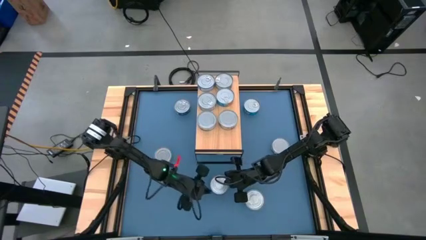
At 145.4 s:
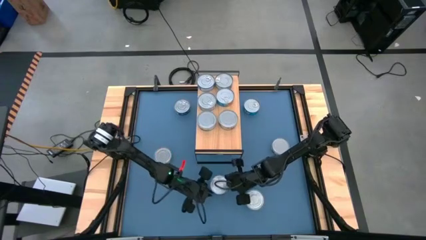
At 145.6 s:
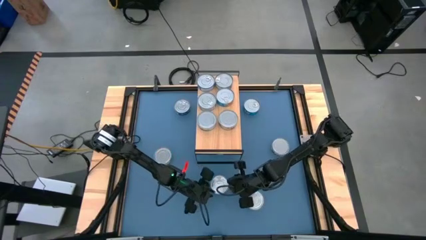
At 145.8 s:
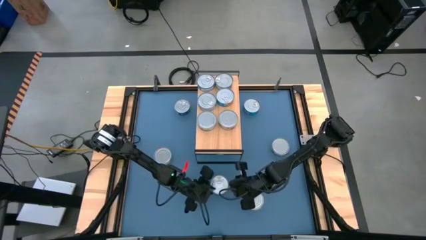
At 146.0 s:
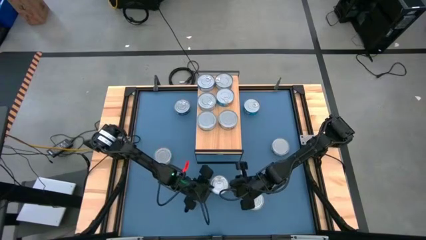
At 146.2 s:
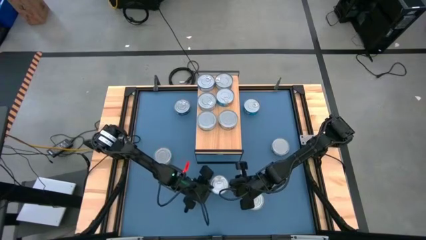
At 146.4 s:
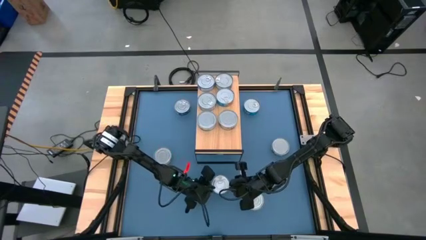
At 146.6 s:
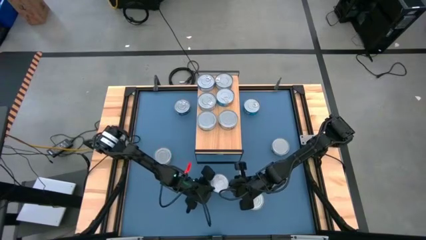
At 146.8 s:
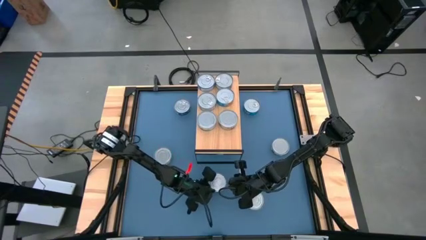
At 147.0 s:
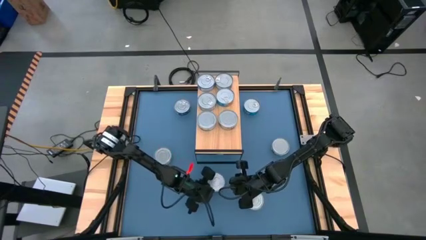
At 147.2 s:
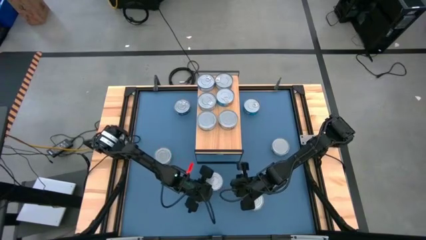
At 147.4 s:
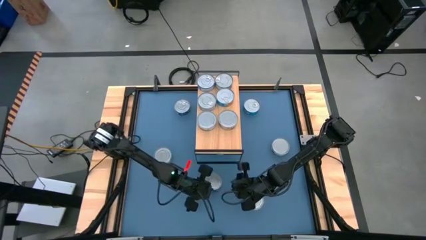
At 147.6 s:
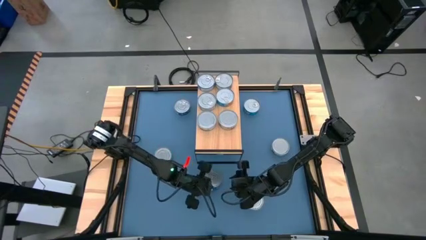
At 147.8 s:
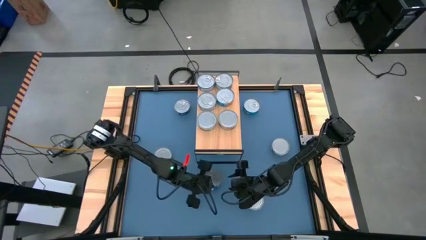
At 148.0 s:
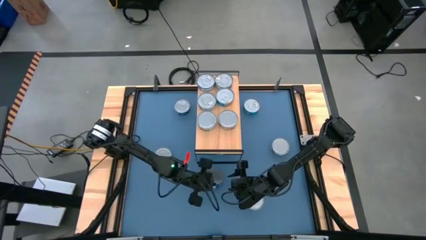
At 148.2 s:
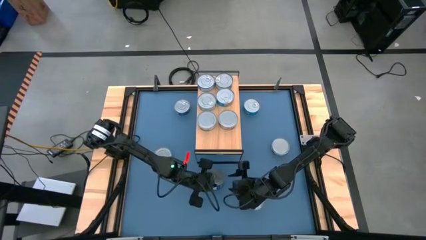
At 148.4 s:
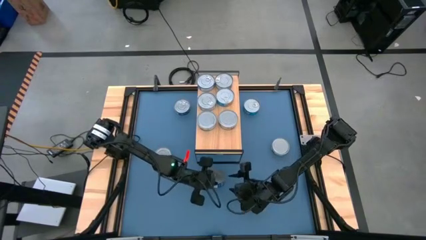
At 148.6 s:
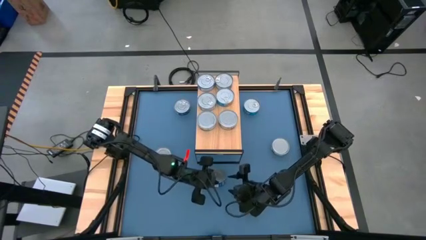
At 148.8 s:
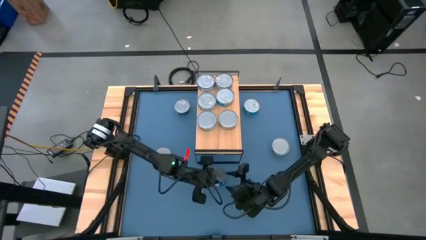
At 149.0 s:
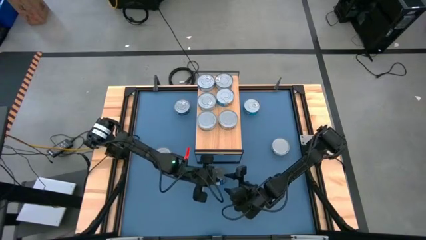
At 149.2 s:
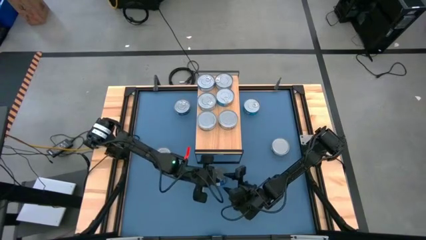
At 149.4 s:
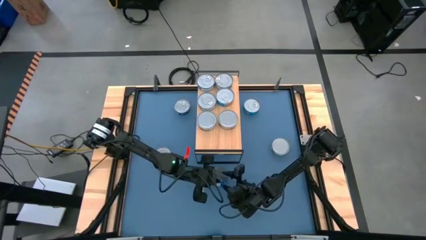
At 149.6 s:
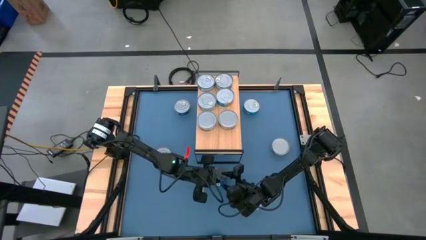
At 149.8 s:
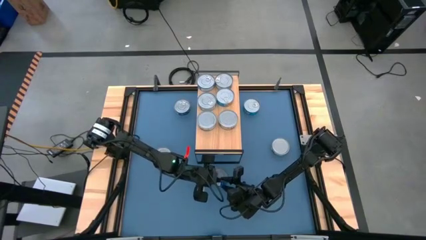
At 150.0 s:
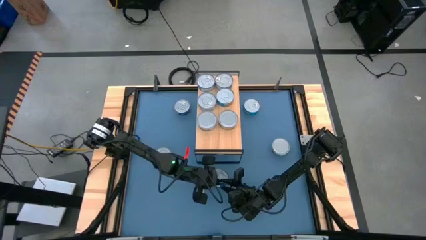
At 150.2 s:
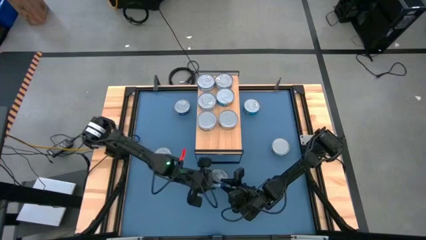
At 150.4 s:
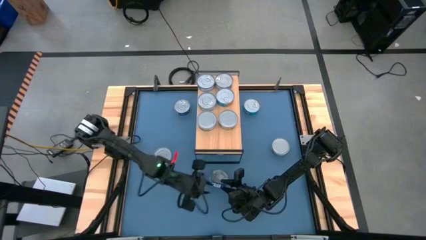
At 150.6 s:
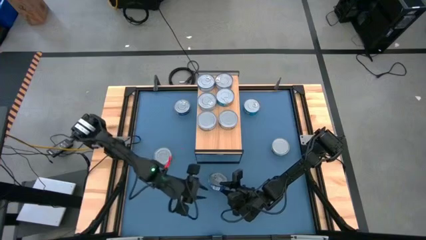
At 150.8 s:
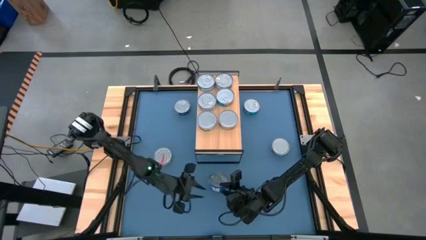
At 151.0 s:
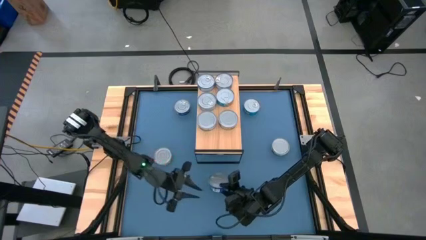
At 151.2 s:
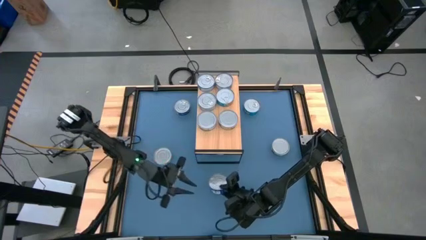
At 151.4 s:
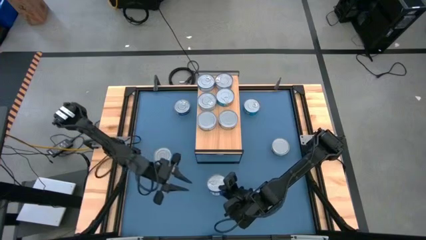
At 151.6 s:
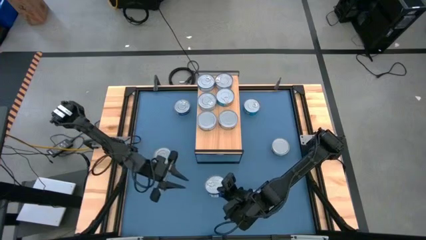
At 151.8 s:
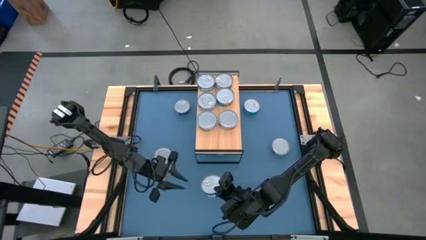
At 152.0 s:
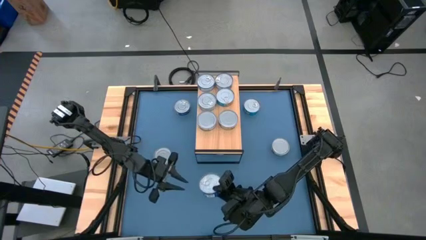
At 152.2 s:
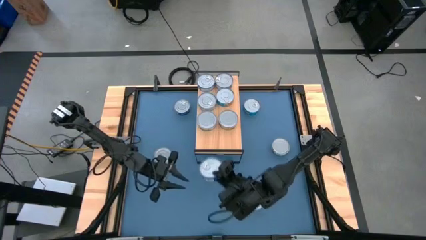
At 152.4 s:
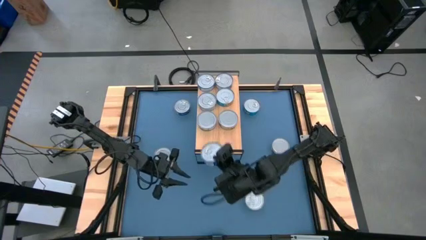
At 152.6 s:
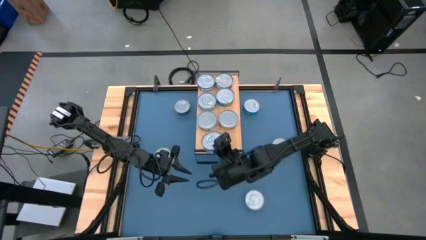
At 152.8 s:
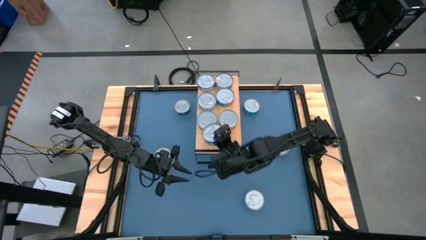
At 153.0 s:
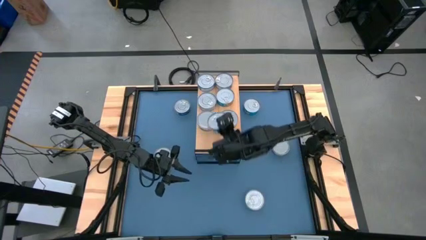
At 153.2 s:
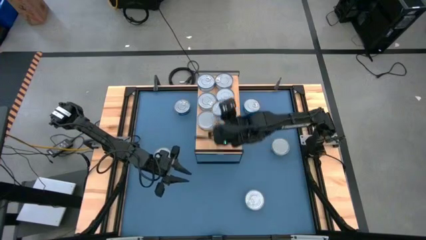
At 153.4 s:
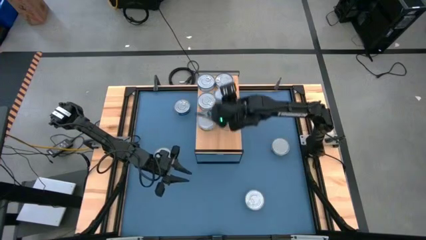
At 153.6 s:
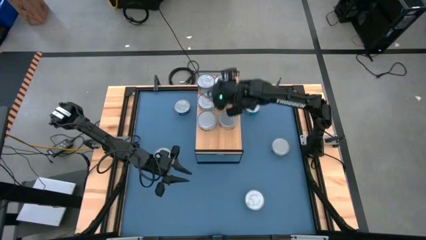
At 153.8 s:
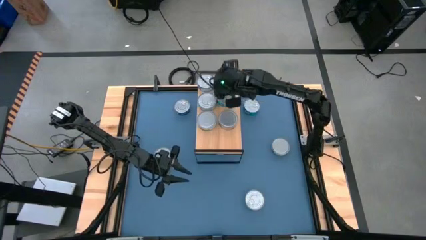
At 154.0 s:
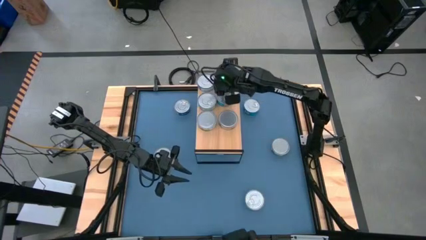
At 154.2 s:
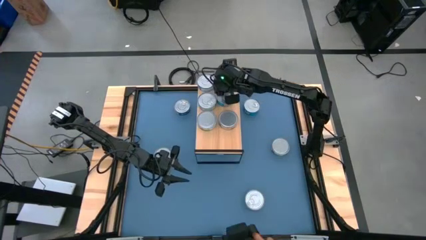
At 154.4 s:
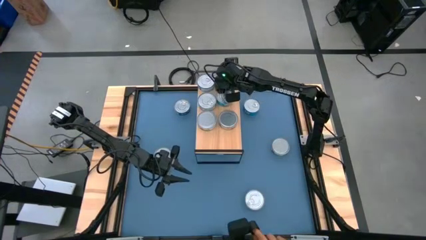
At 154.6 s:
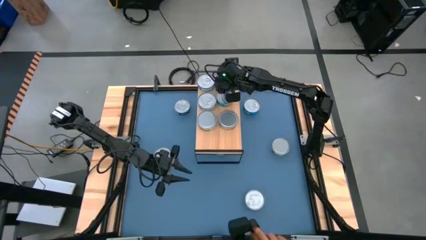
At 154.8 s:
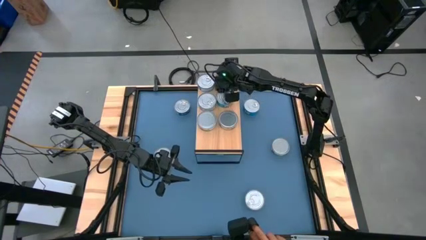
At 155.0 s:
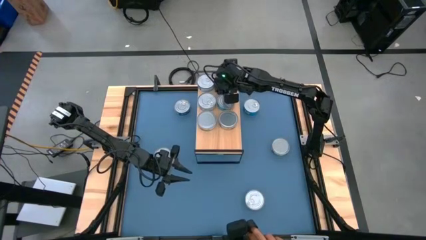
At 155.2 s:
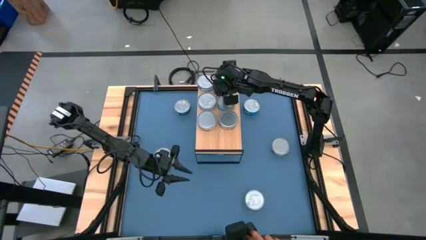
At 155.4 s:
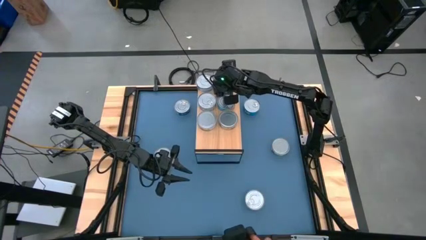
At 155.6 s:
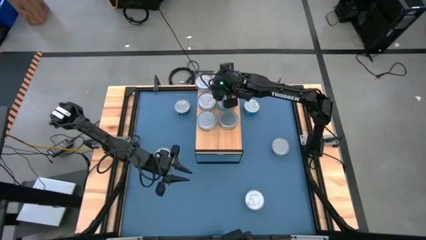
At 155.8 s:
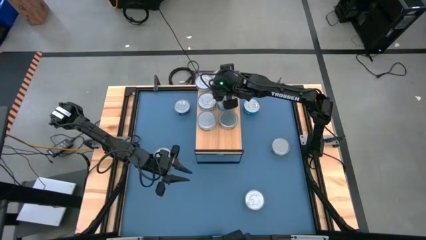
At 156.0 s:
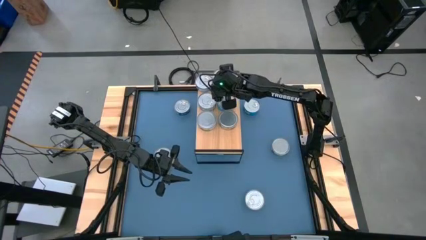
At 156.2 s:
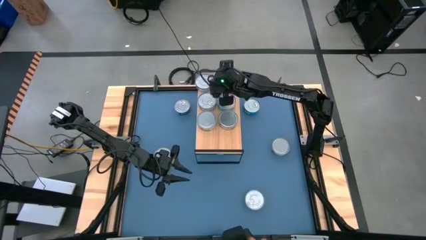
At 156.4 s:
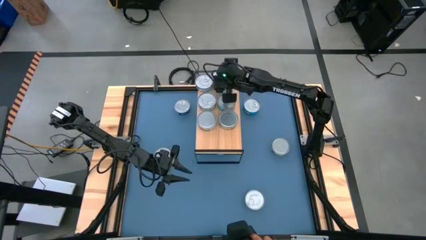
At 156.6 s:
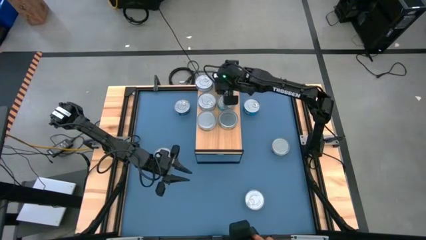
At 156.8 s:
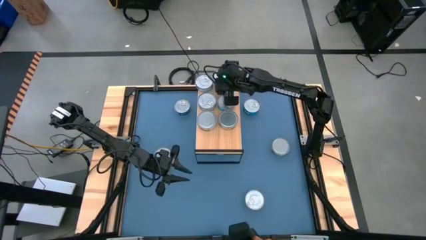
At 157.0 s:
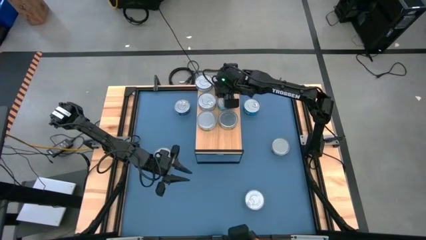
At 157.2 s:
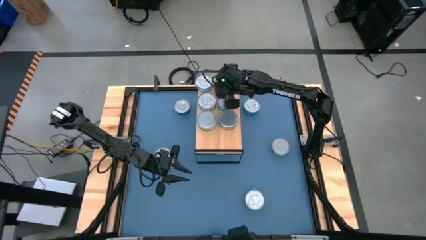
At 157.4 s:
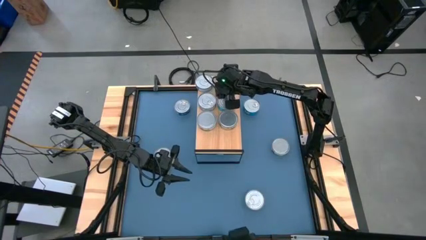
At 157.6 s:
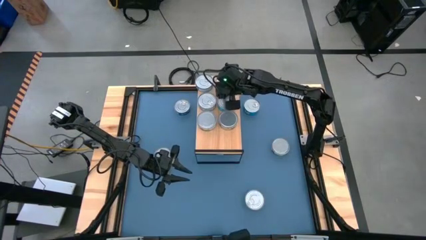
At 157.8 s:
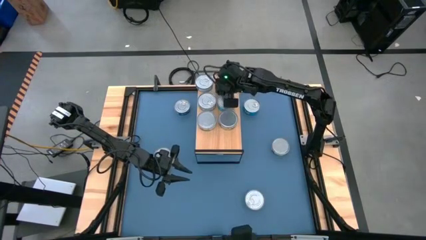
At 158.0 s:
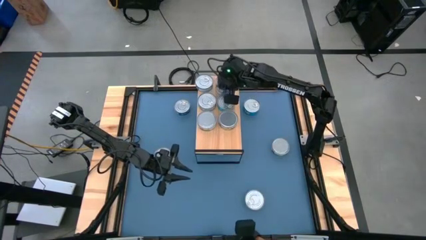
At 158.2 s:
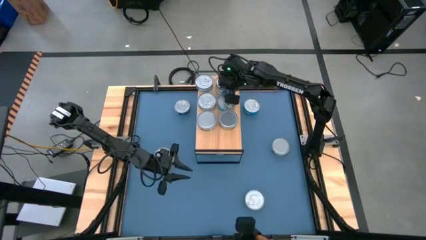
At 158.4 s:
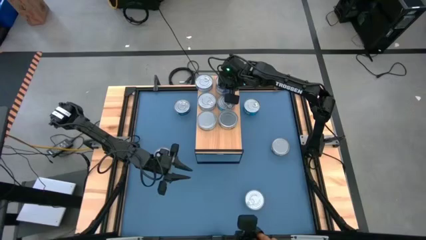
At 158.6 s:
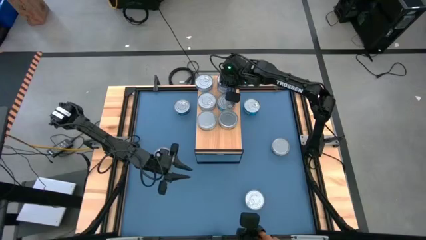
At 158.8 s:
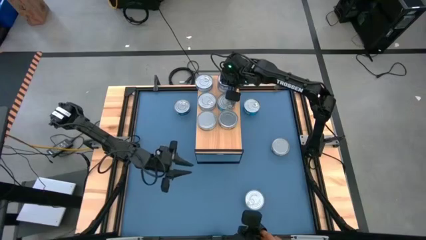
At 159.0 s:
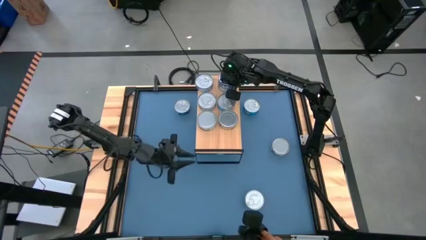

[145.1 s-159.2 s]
Task: Stack canned seafood by type on shelf
Stack the blue tuna can on top of the other blue tuna can on the shelf

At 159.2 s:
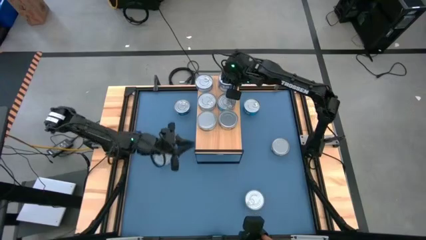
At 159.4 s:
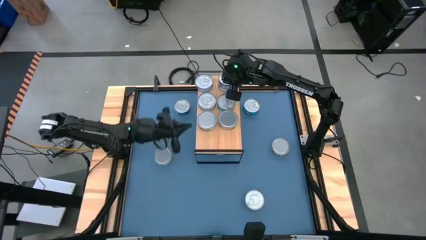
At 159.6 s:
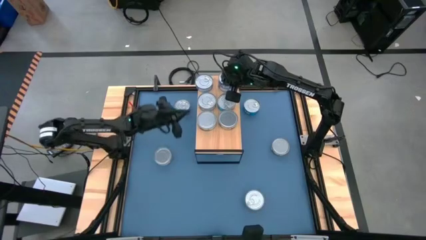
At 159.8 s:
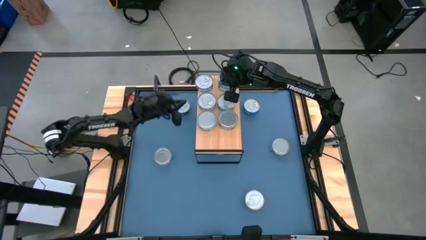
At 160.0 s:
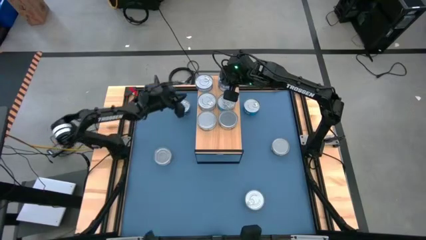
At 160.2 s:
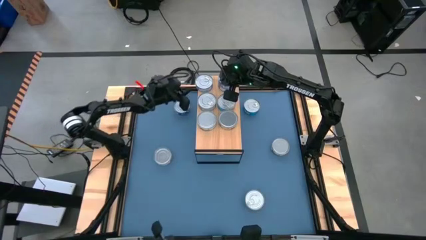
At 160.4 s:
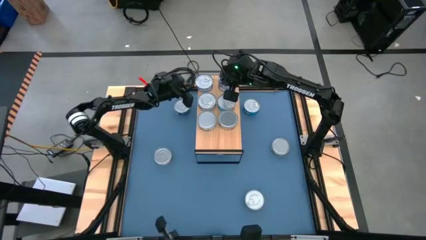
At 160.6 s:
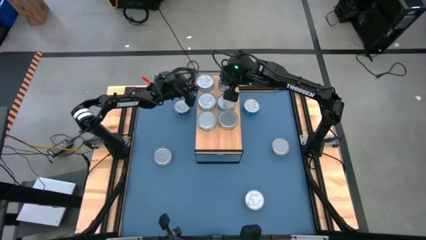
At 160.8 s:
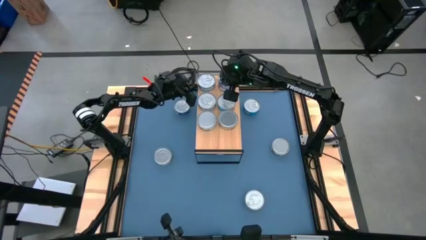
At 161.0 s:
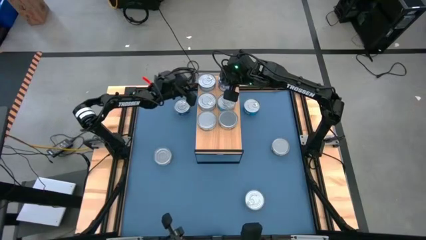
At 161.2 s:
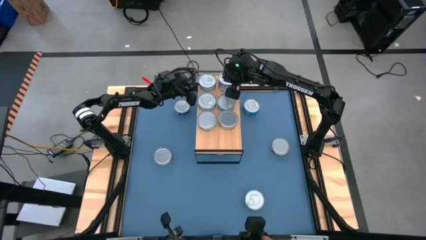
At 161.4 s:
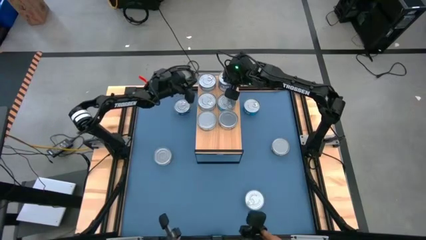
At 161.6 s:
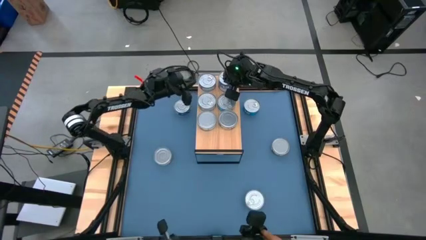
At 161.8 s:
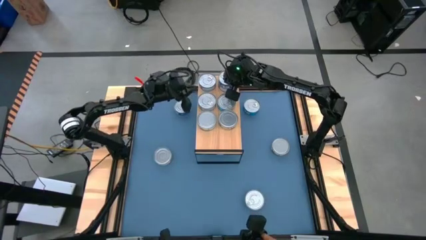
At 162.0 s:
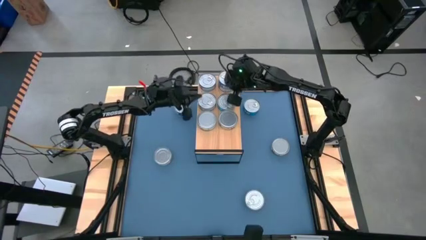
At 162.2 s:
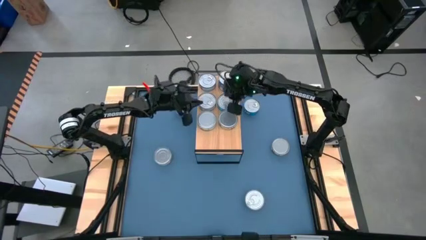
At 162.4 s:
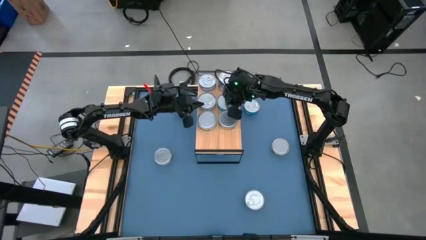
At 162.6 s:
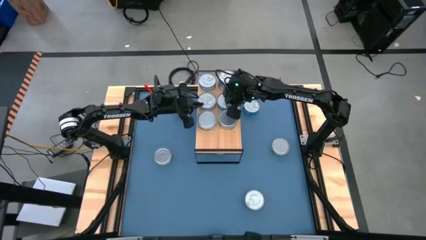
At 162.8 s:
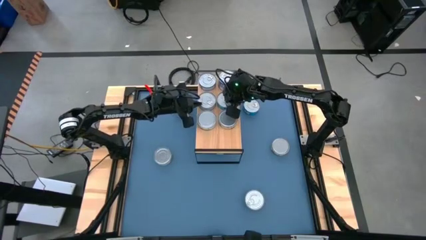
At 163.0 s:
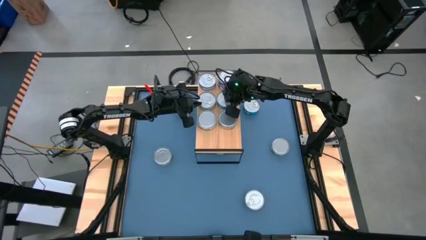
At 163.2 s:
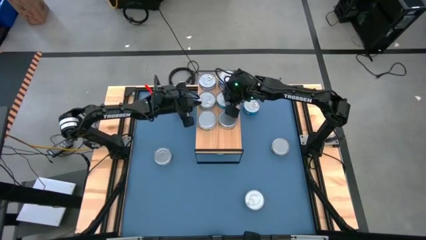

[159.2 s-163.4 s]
Adjust the tuna cans on the shelf
